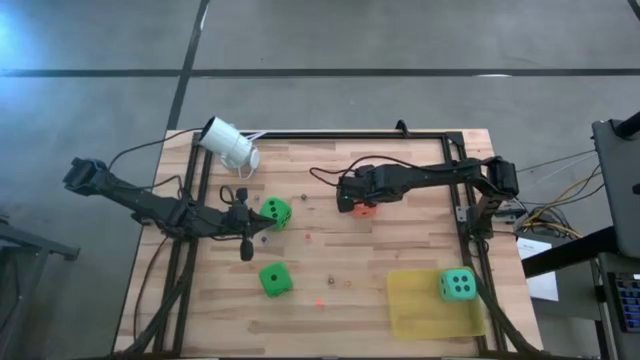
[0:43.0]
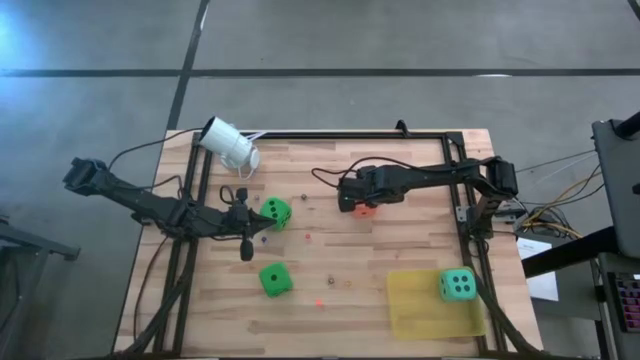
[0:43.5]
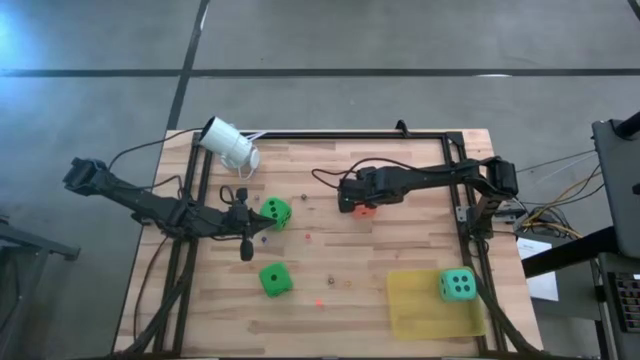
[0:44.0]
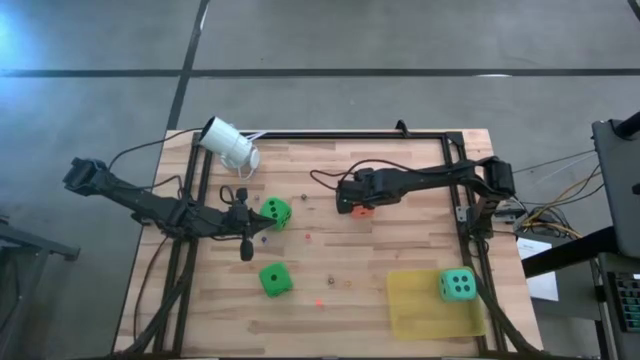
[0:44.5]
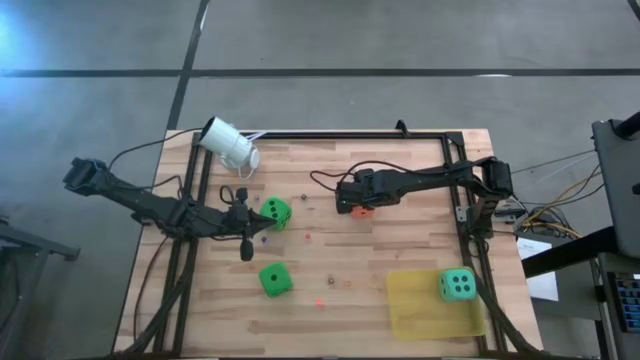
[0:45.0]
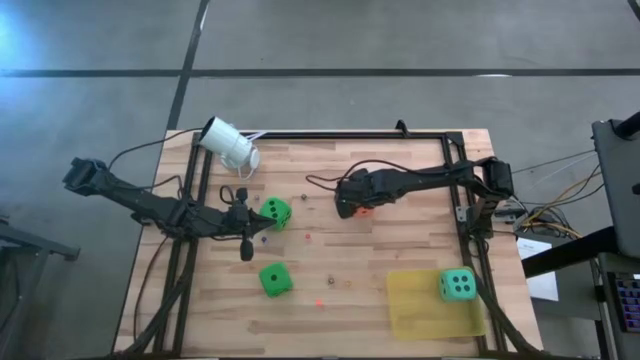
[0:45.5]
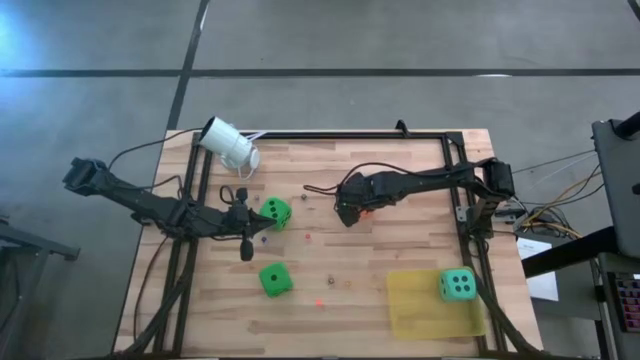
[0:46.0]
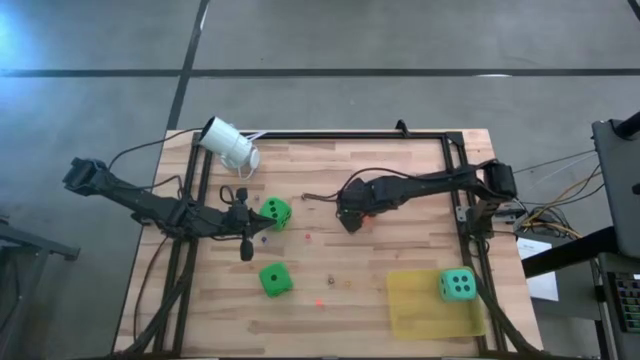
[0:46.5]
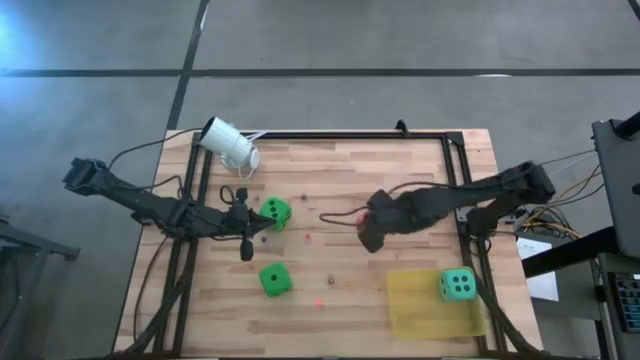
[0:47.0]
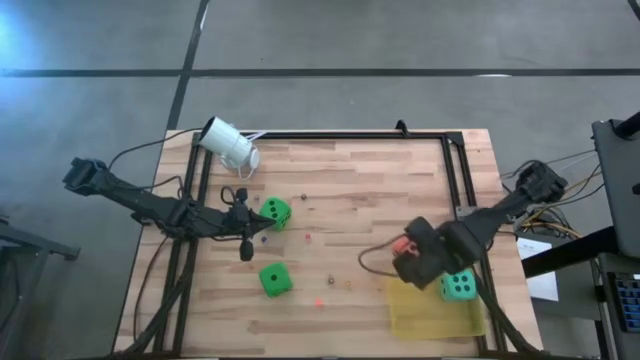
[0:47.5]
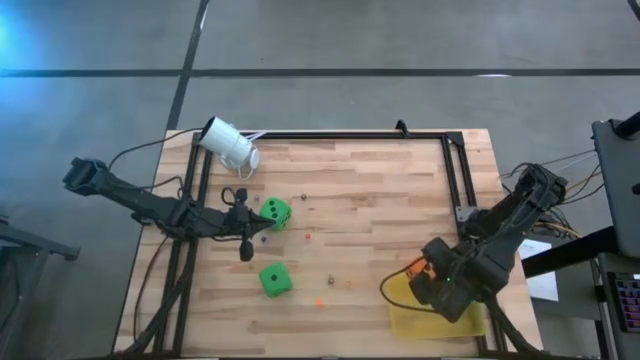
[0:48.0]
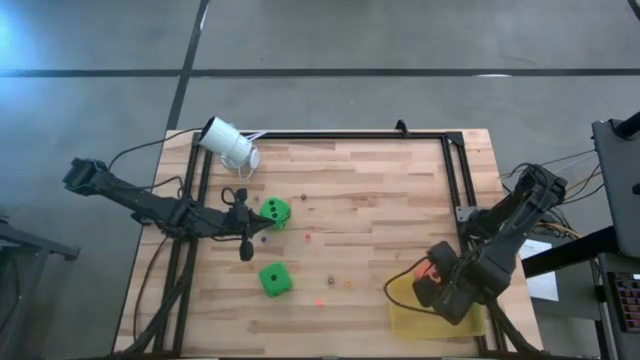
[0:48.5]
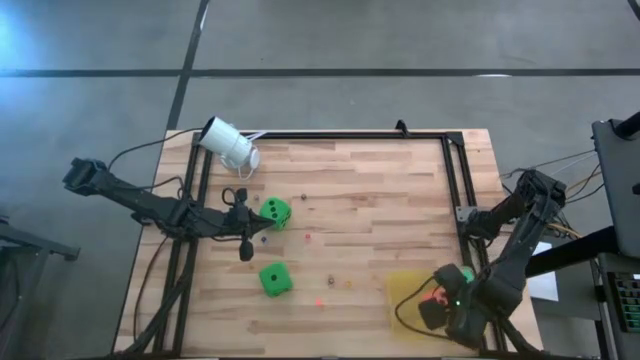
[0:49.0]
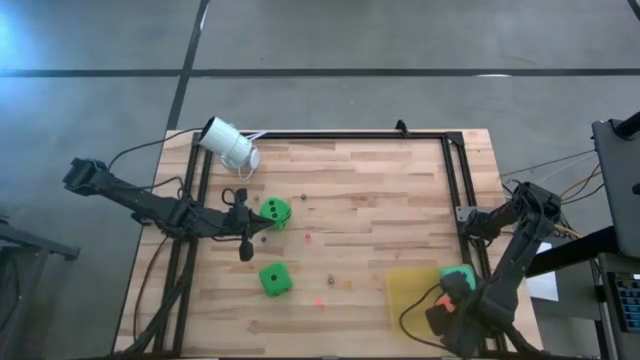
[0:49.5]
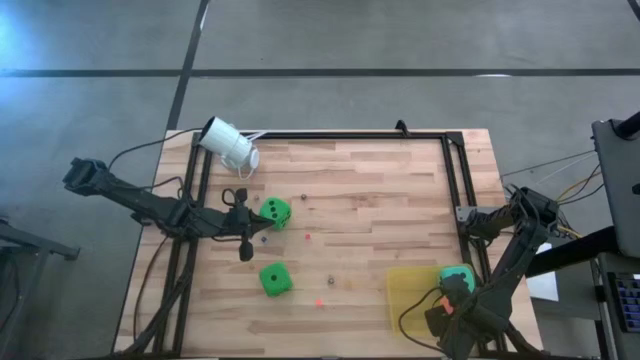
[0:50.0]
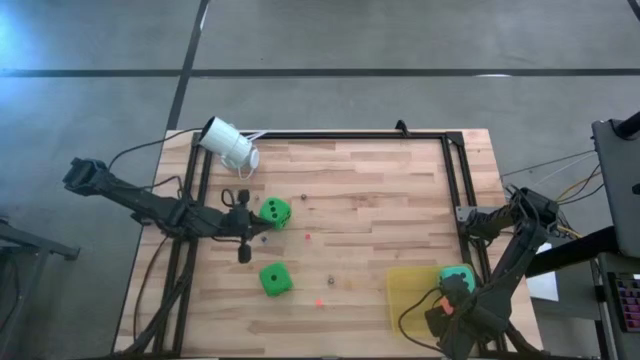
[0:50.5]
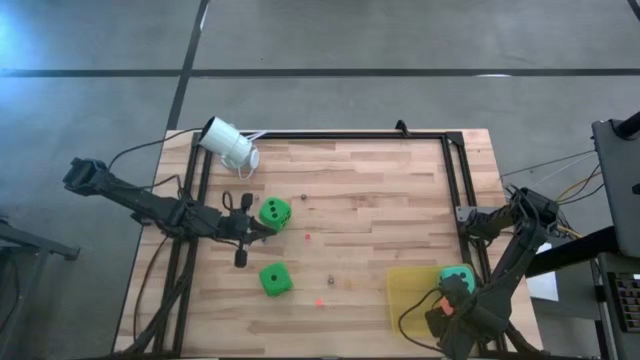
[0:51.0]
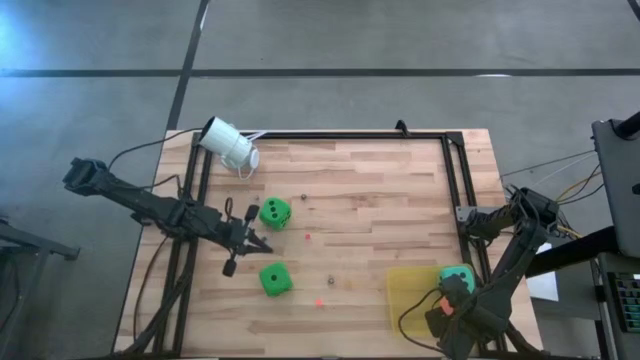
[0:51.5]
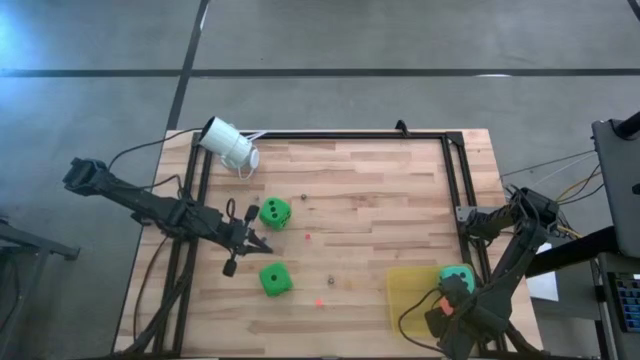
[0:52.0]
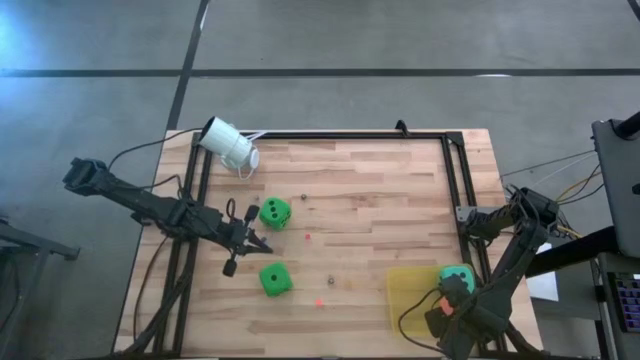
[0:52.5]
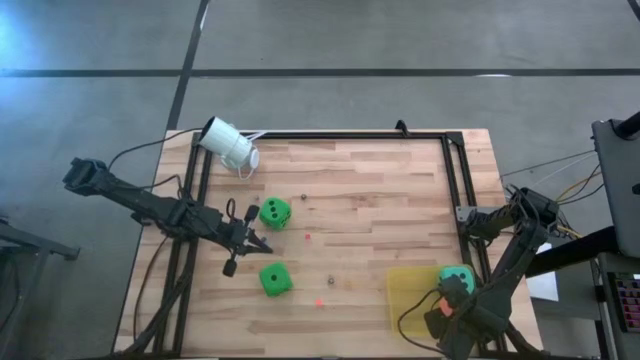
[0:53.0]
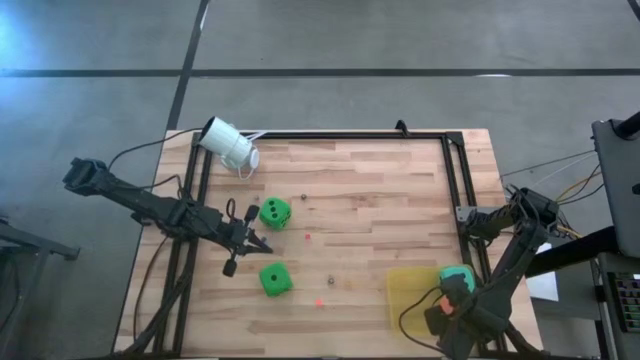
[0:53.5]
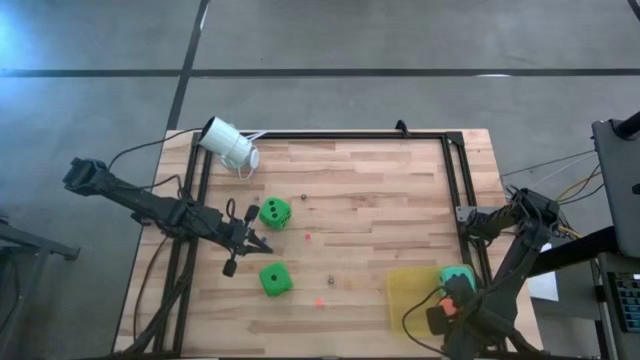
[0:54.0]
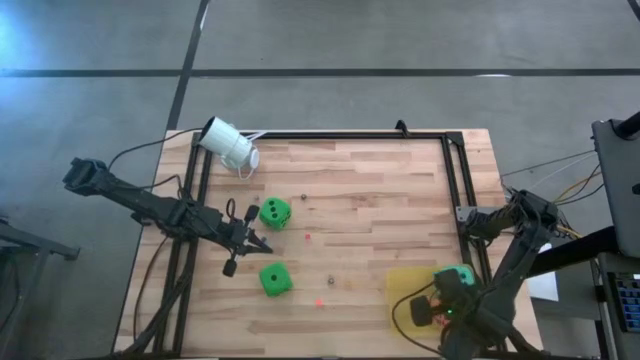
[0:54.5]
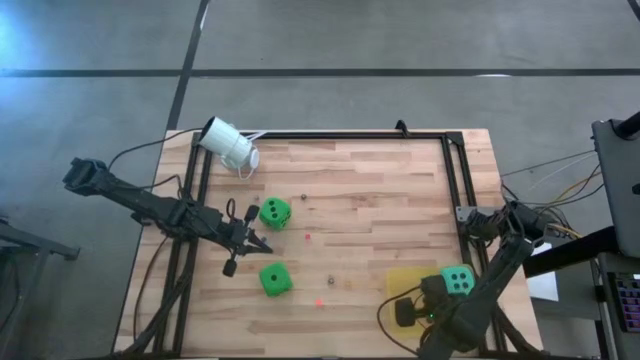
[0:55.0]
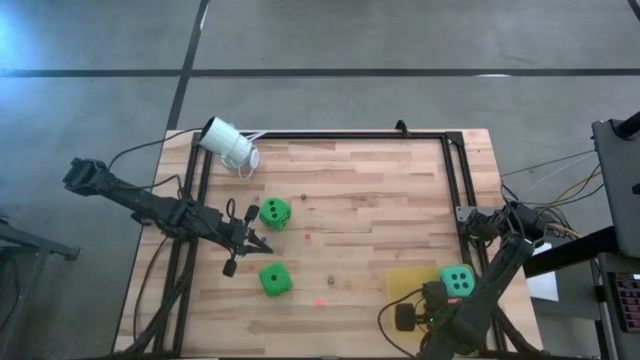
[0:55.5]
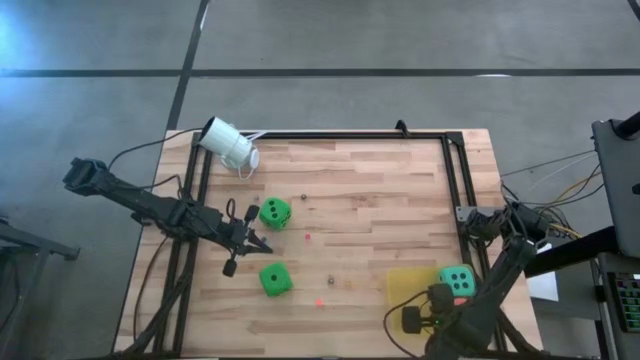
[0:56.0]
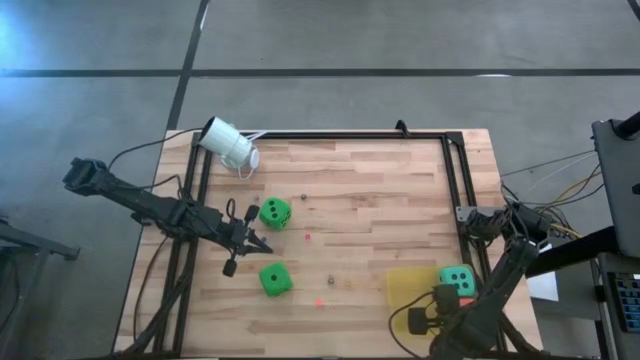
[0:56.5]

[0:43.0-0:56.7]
Task: Pick & Place Dice
Put the large orange die into the yellow bin

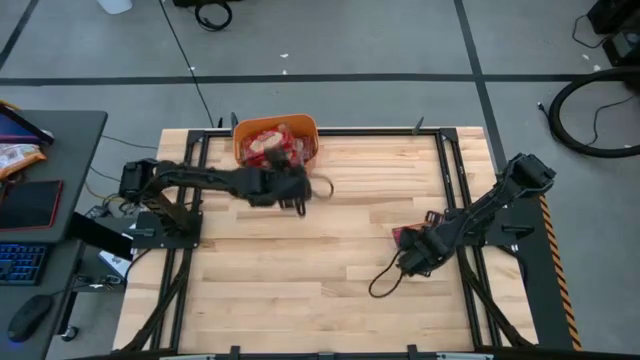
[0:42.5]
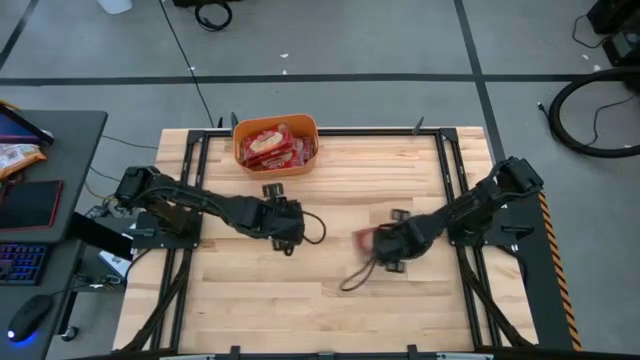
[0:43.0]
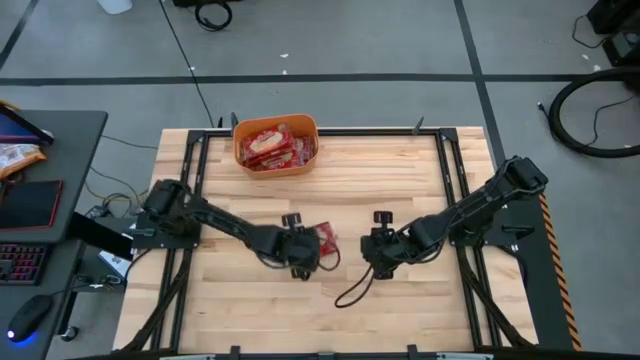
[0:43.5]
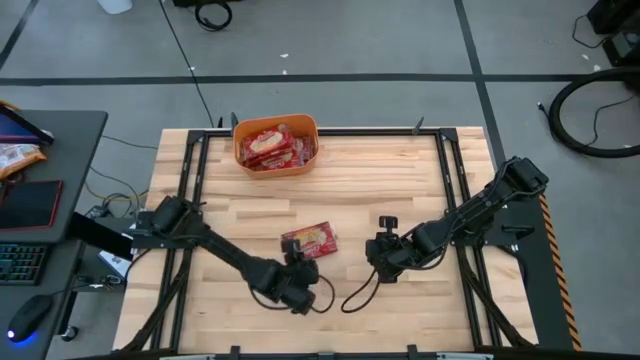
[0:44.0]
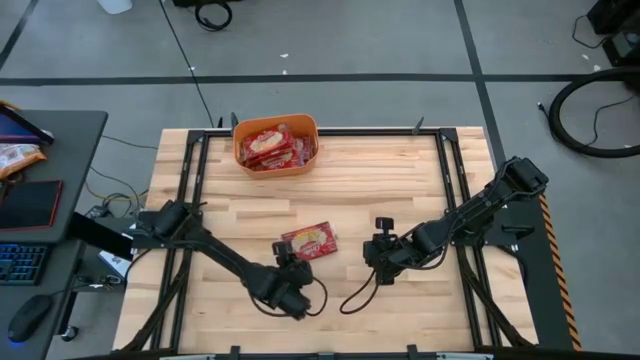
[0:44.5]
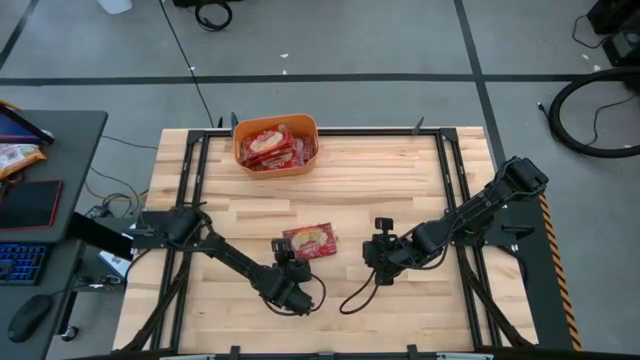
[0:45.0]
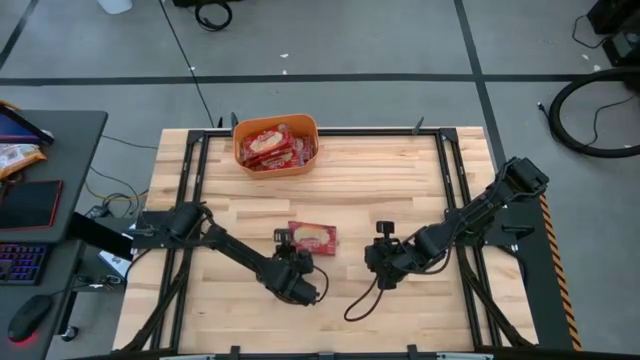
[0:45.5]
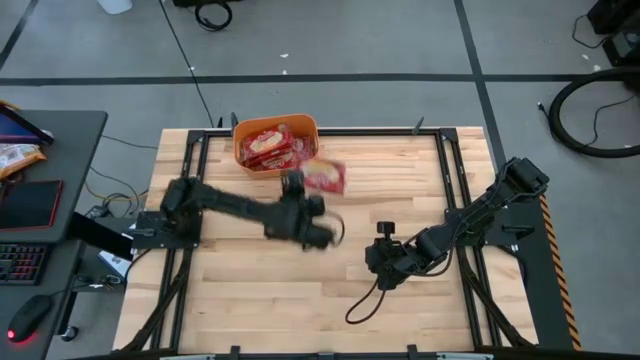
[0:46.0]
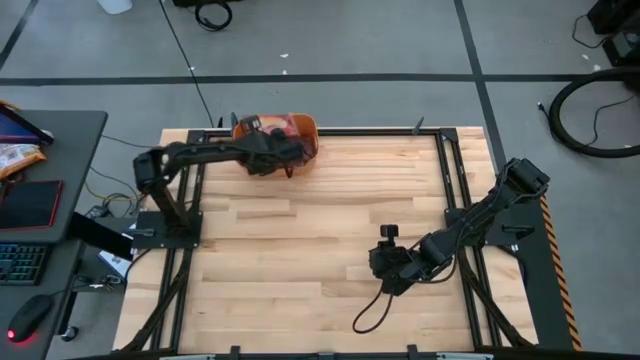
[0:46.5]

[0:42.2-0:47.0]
Task: Sort popcorn bags into baskets
Put the red popcorn bag into the orange bin

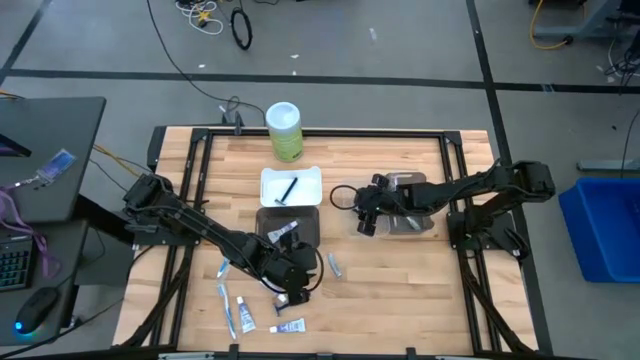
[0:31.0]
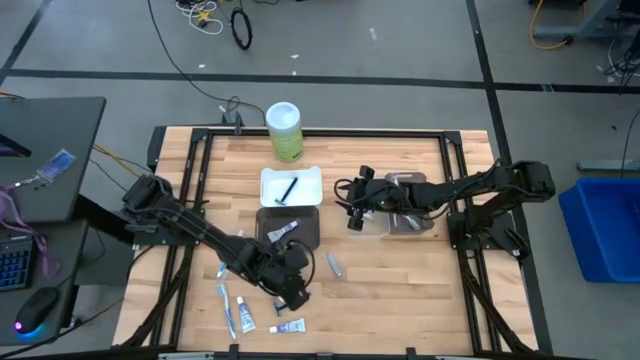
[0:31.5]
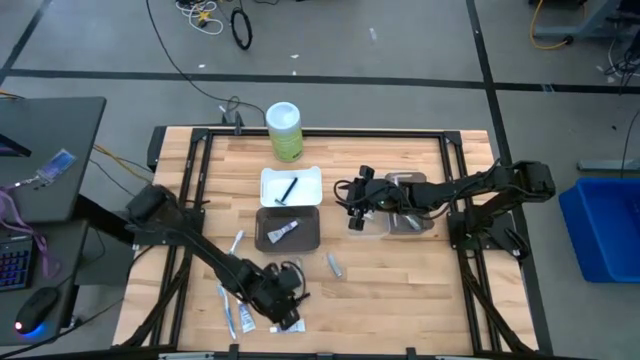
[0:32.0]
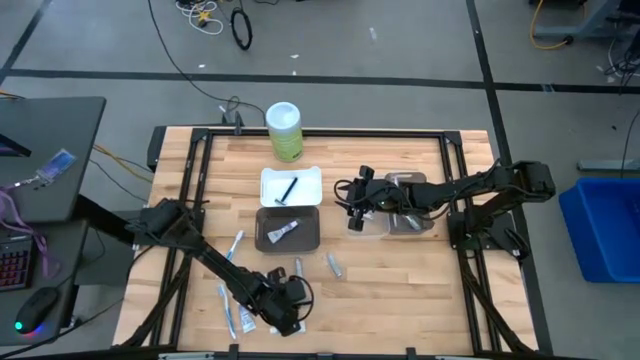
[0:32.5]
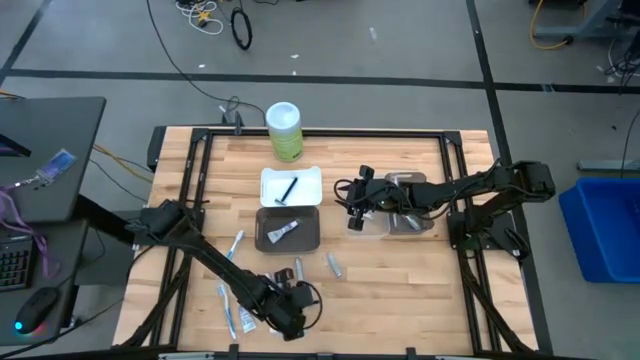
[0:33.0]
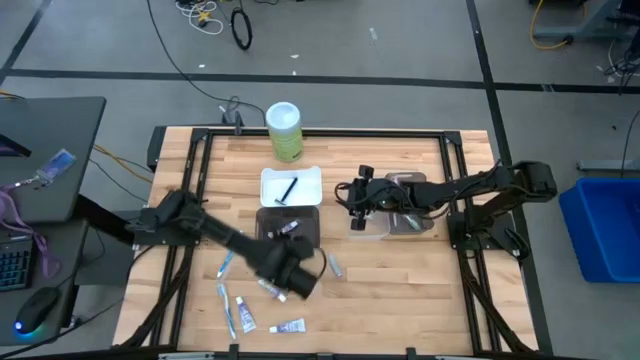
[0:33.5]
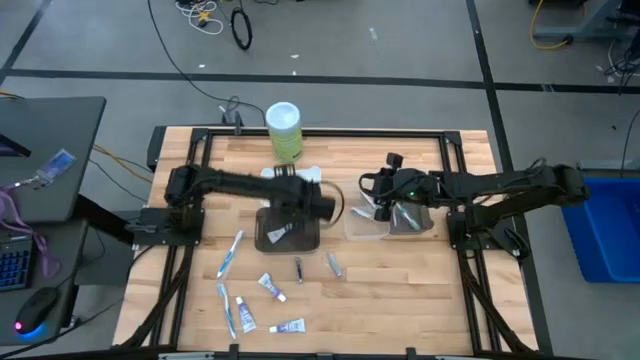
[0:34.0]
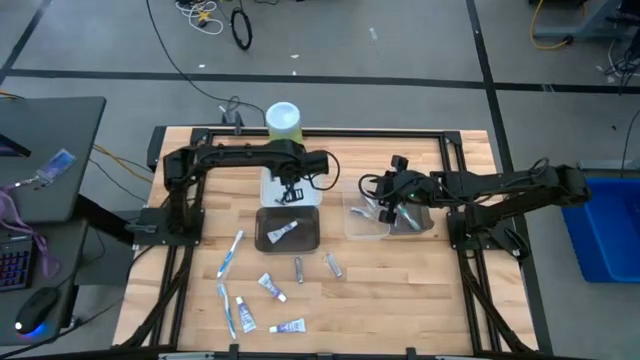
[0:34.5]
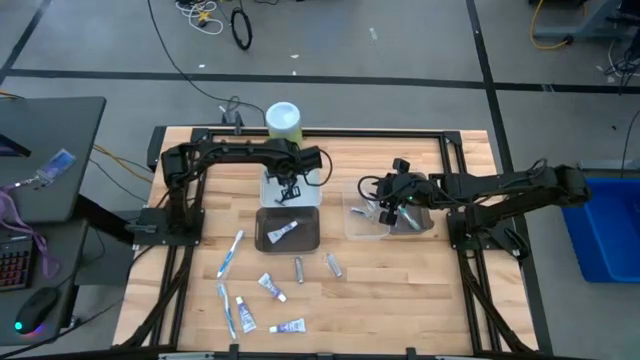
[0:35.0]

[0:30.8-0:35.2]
Task: Pick & Place Travel size toiletries
Put the blue razor into the white bin
